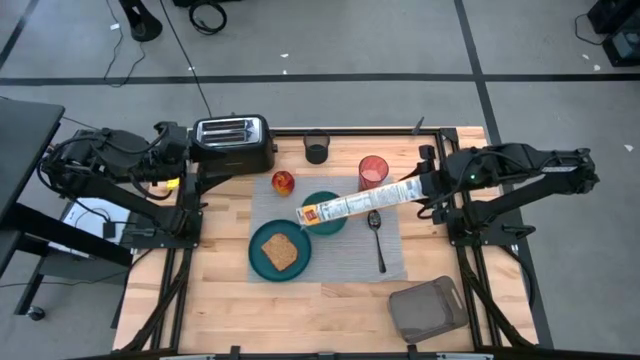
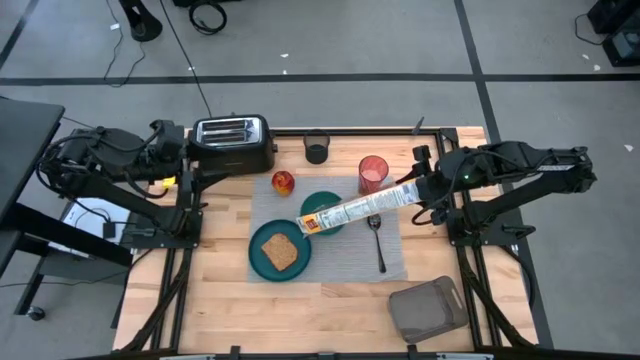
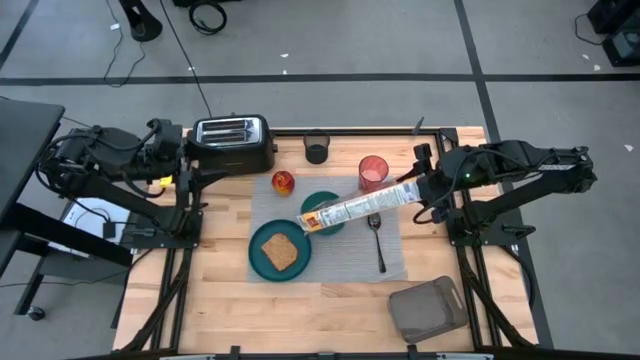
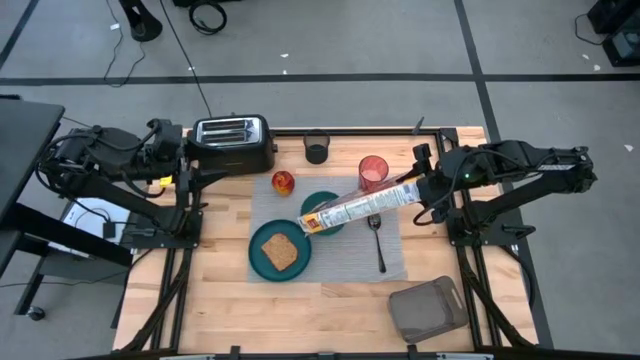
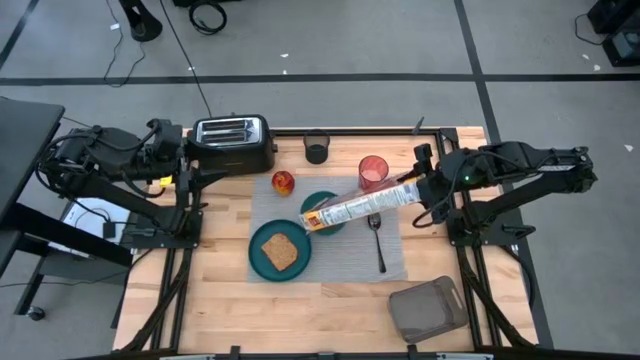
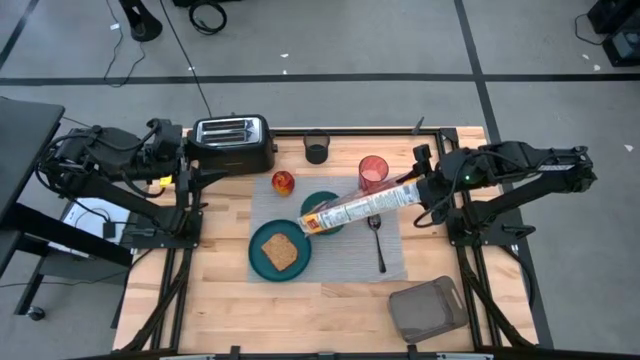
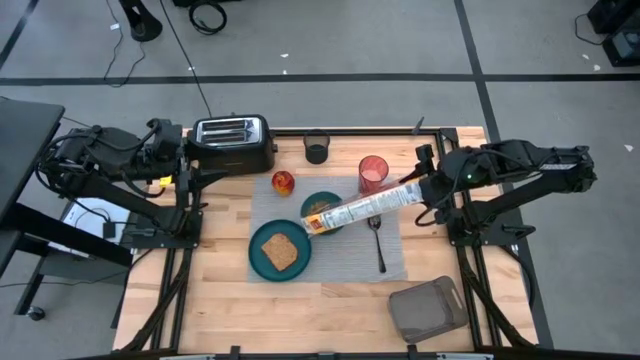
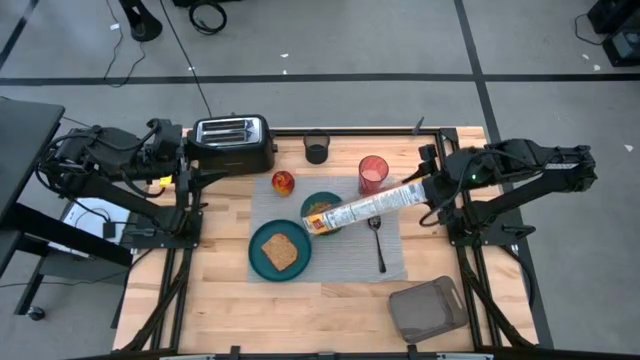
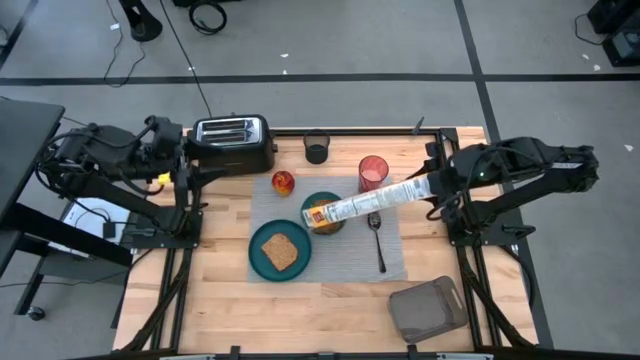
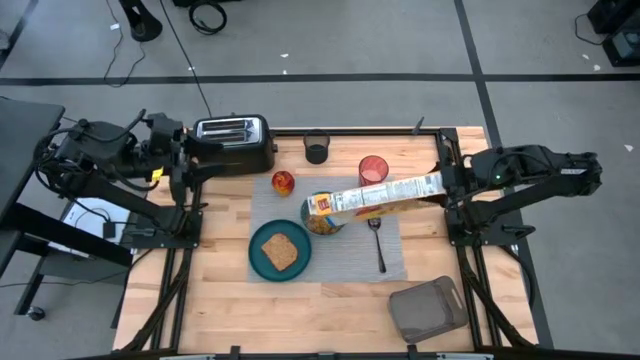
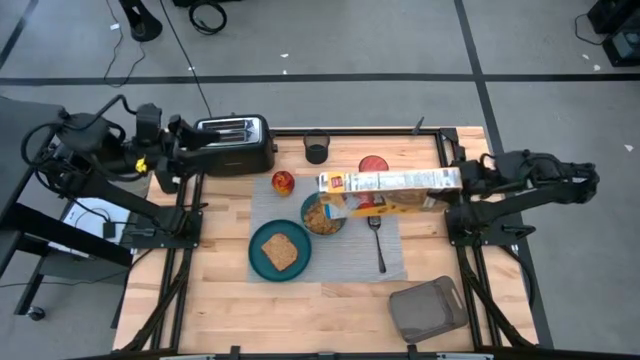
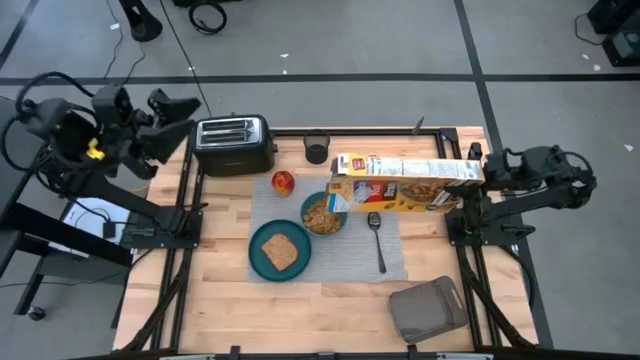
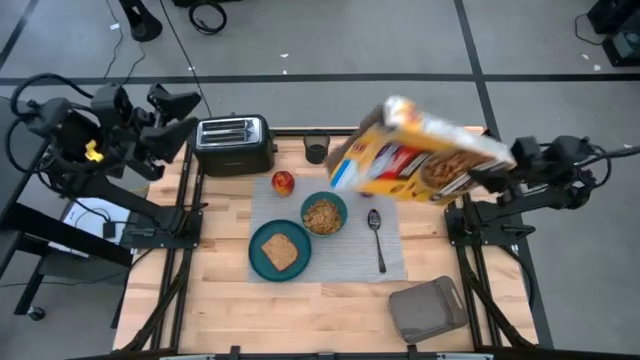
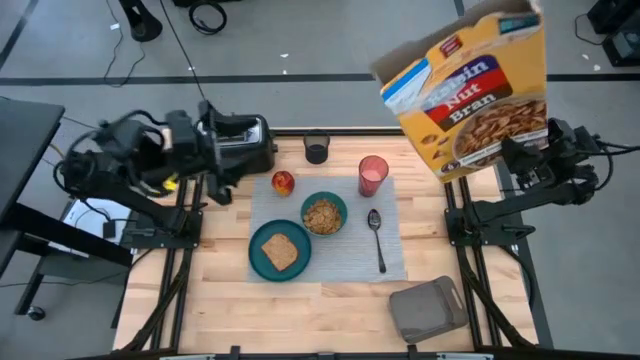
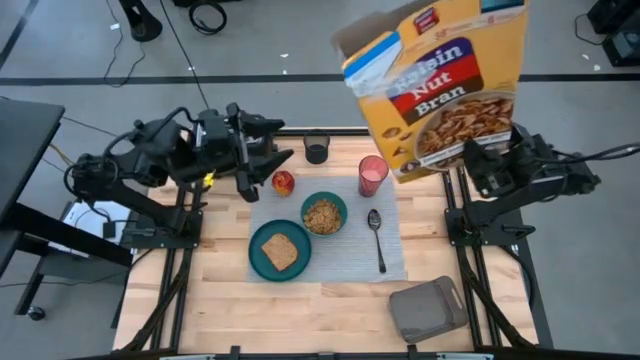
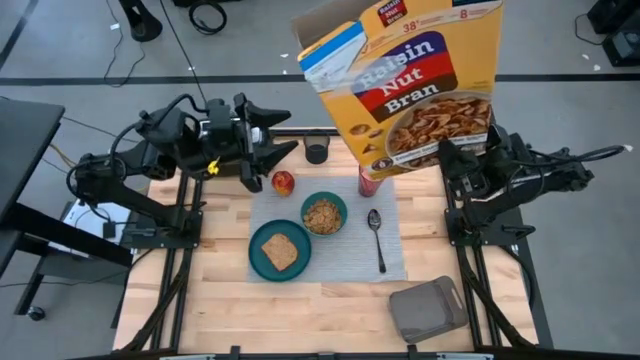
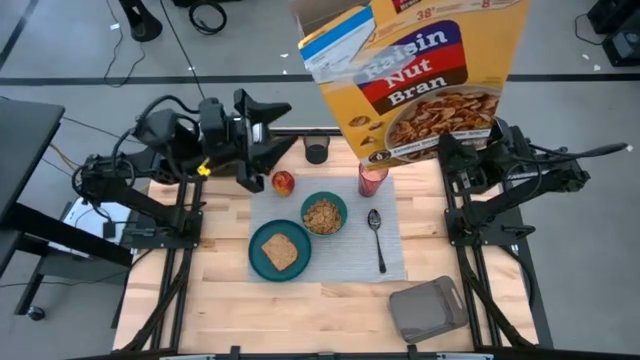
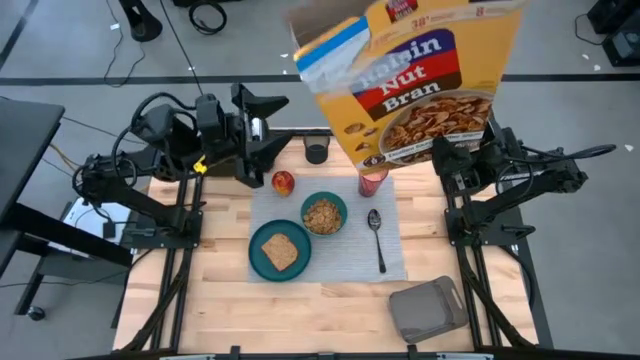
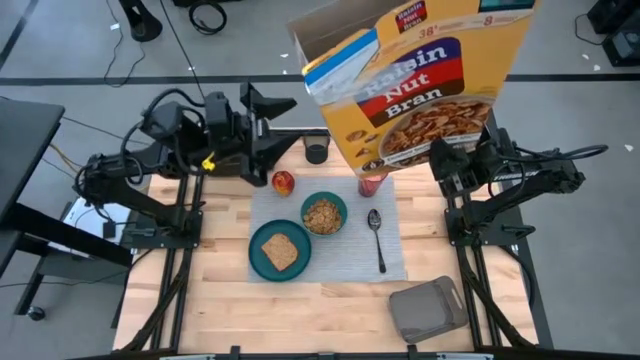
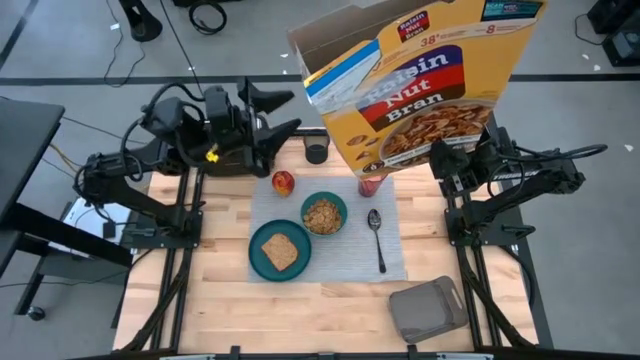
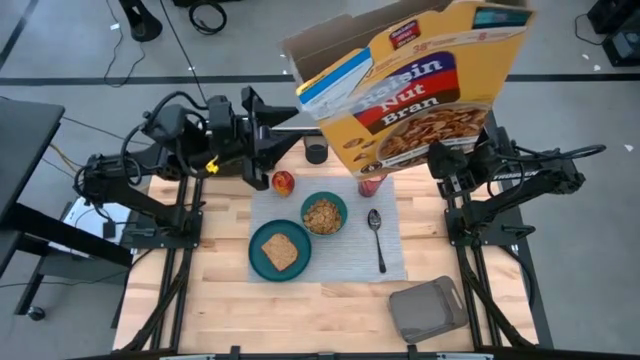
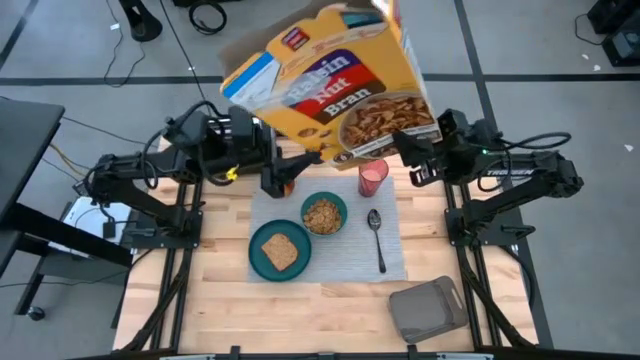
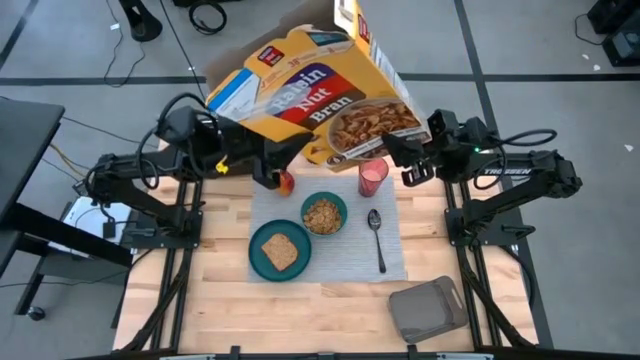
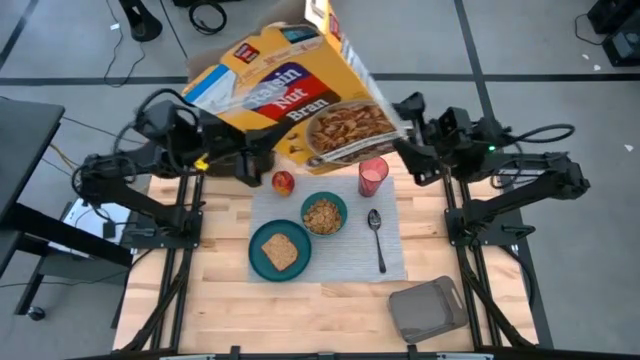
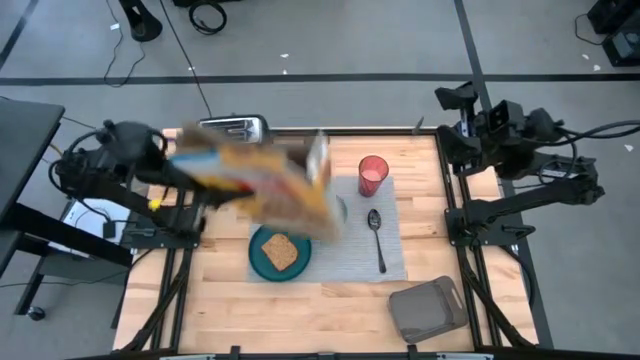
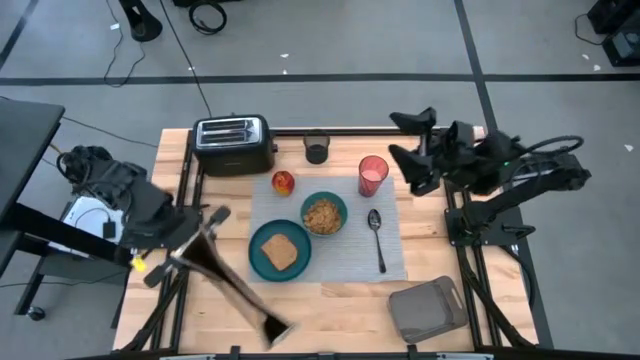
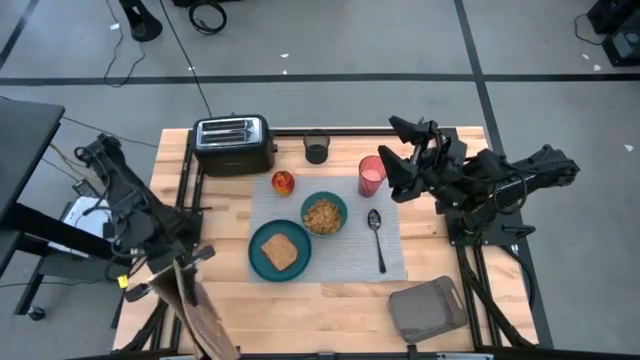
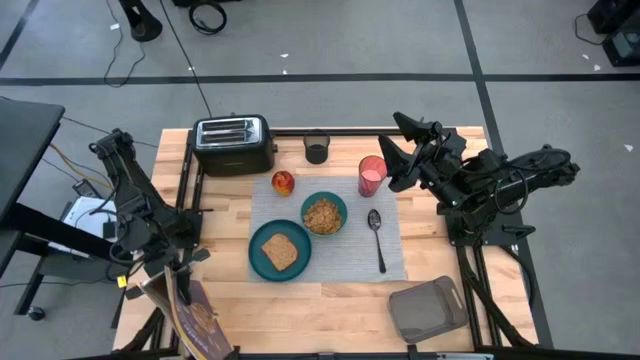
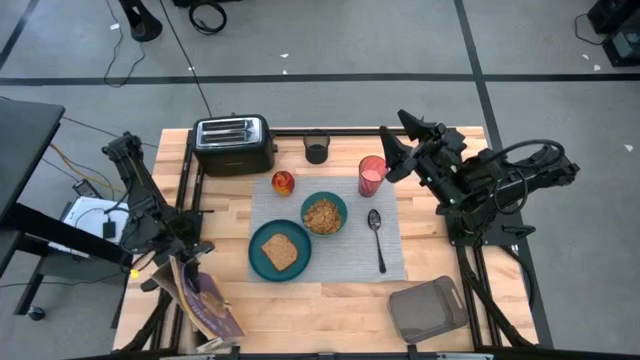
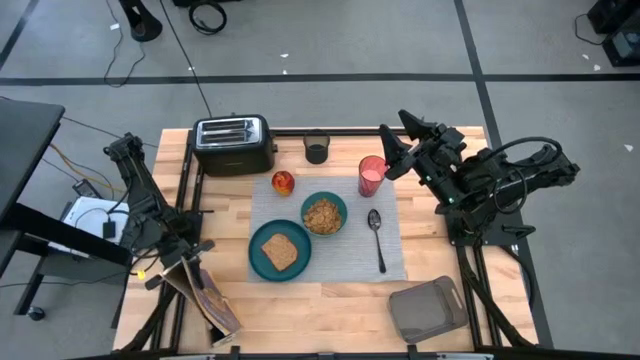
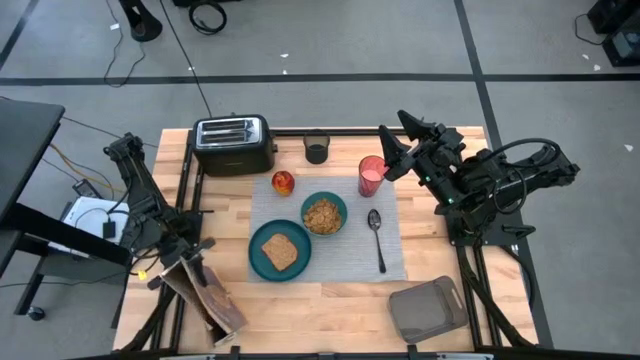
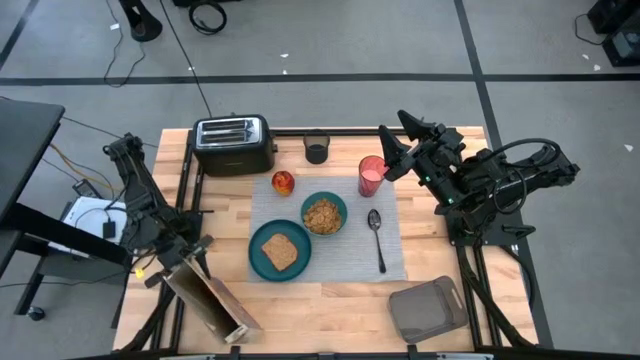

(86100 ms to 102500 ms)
Task: Arrange a breakfast setting
Pour the cereal from the yellow cereal box into the green bowl

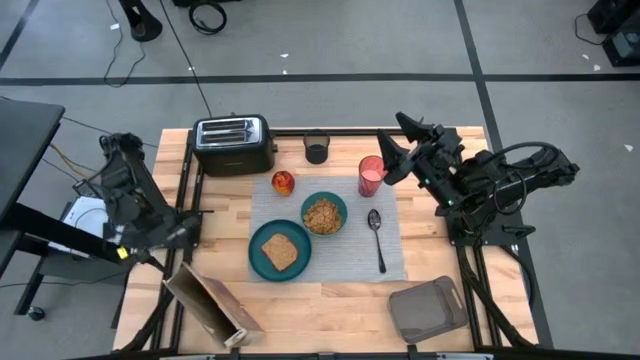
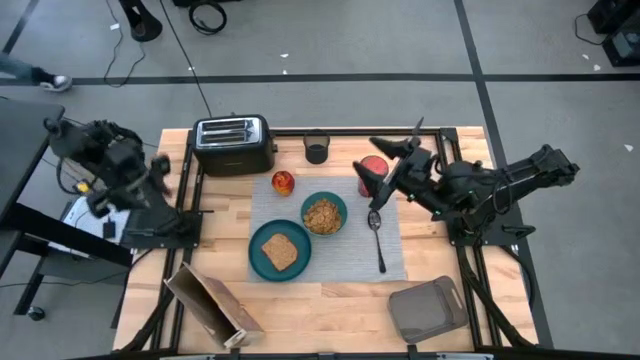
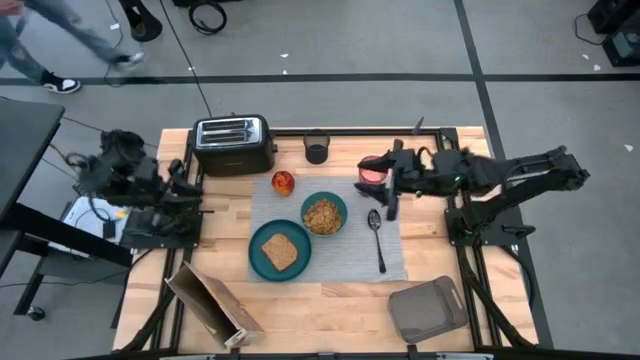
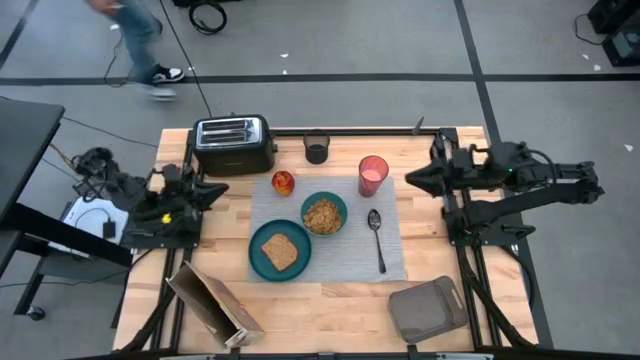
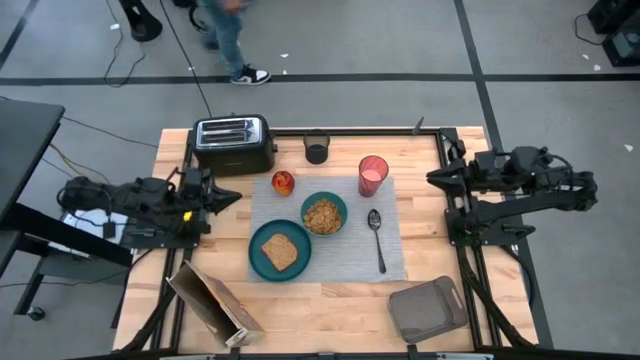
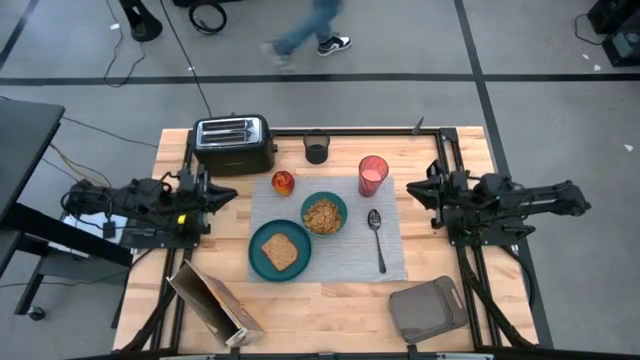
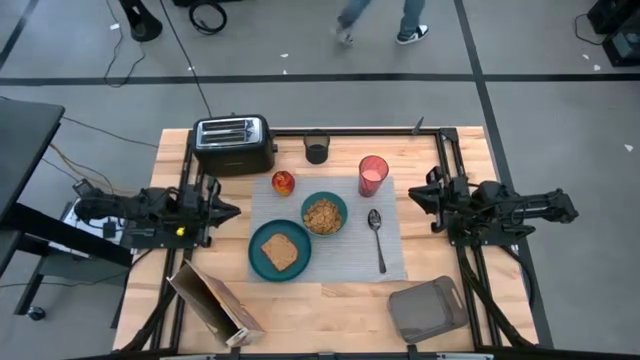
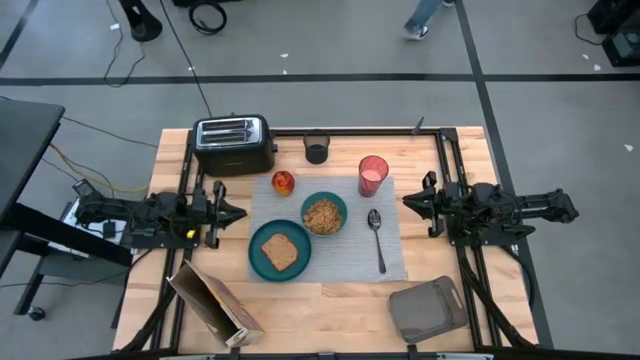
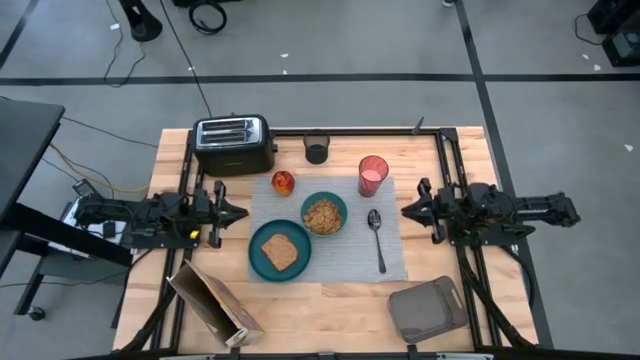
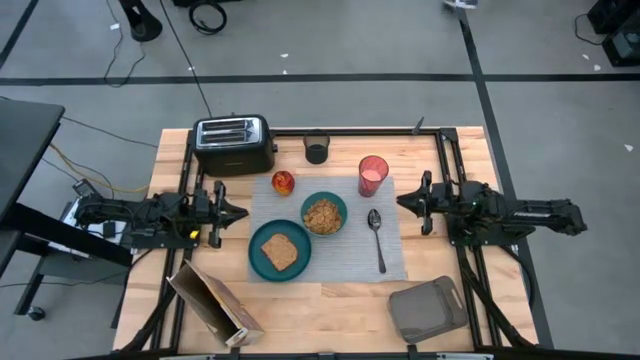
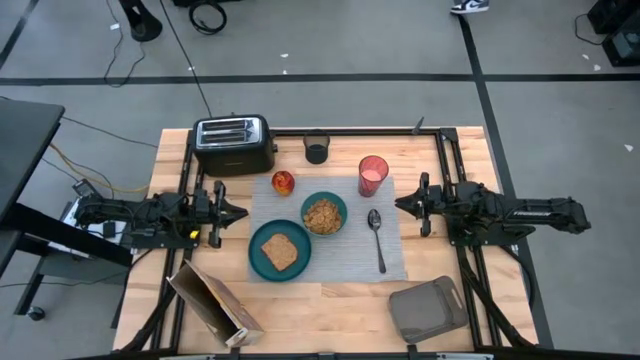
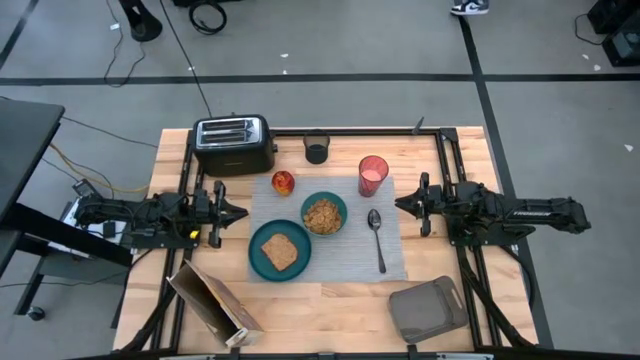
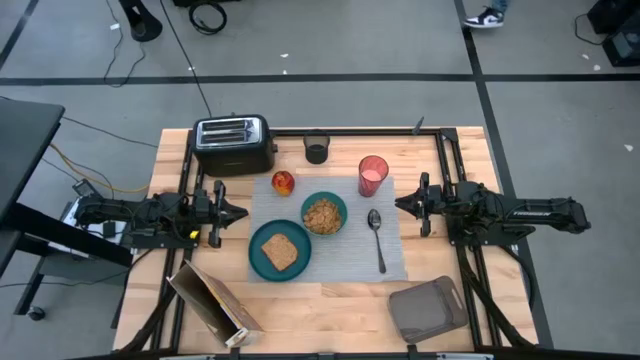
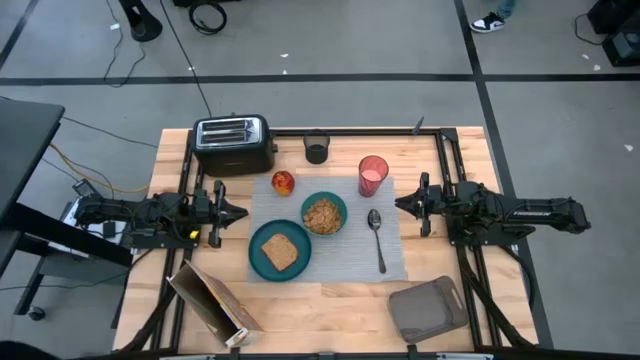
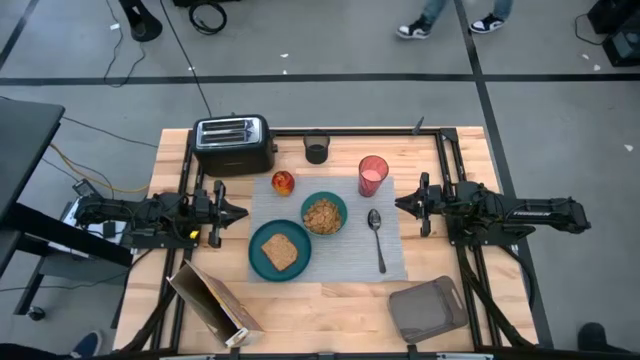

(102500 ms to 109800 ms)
Return to Home Position
